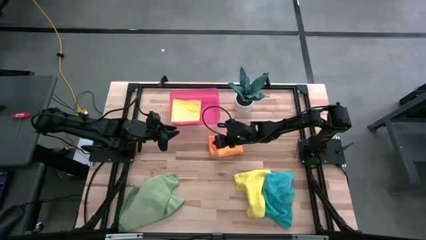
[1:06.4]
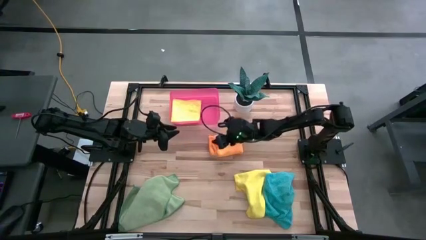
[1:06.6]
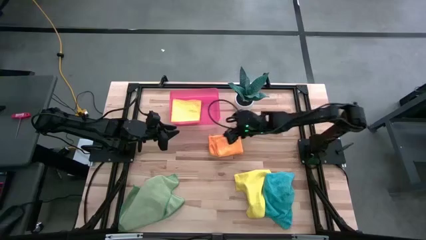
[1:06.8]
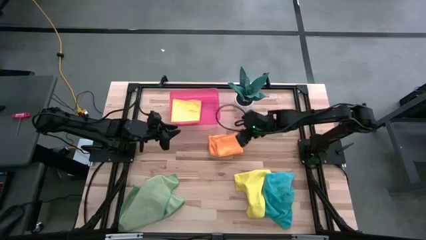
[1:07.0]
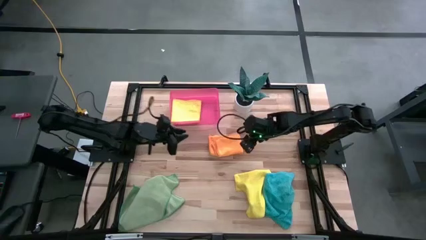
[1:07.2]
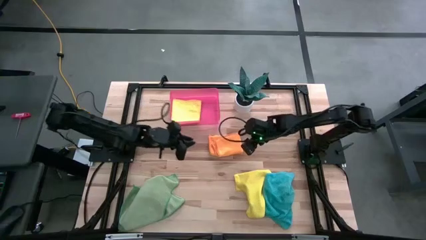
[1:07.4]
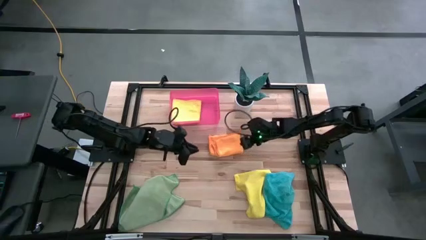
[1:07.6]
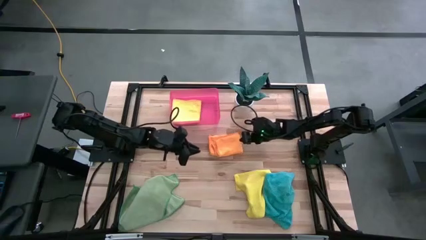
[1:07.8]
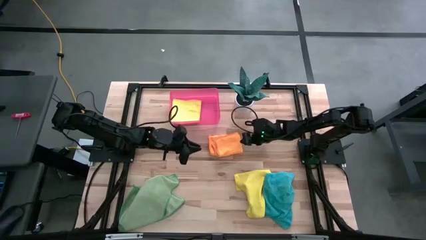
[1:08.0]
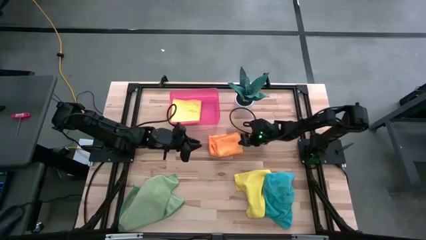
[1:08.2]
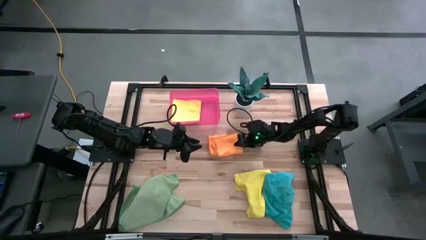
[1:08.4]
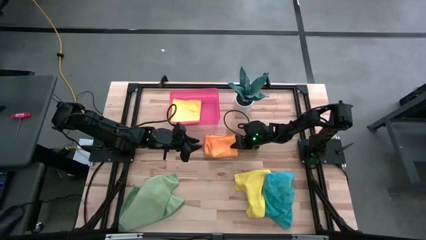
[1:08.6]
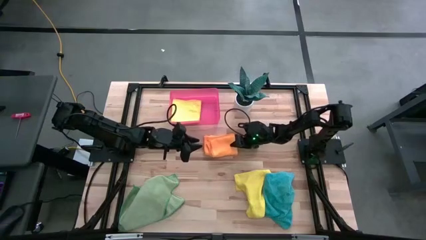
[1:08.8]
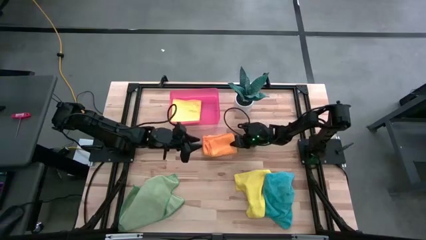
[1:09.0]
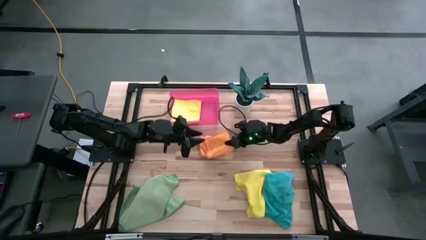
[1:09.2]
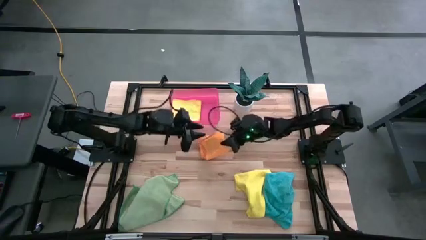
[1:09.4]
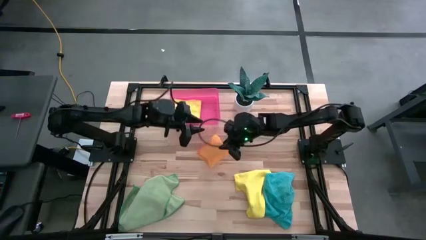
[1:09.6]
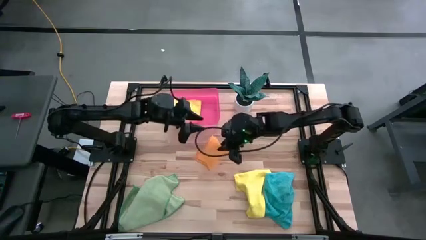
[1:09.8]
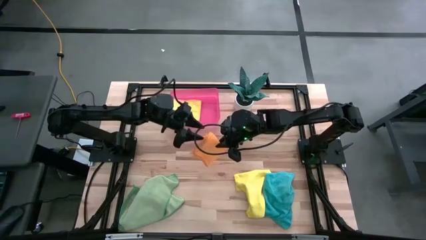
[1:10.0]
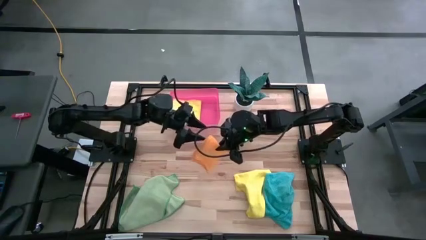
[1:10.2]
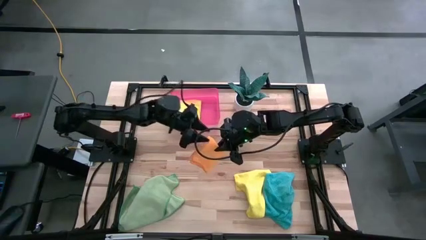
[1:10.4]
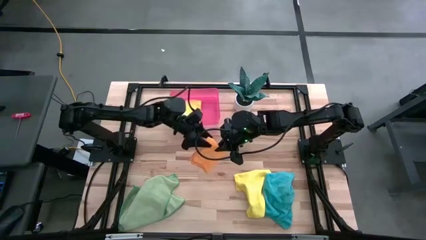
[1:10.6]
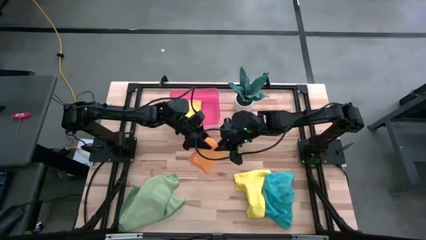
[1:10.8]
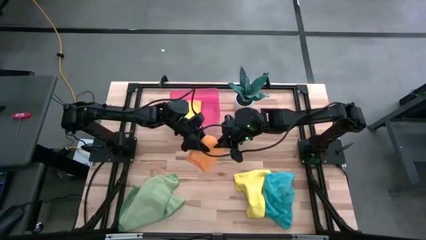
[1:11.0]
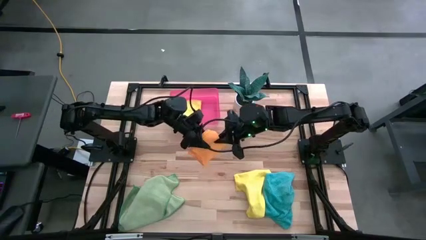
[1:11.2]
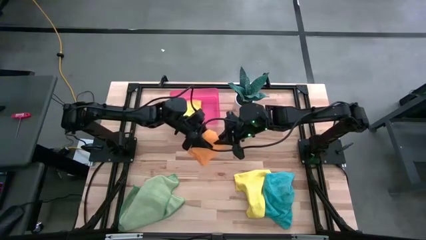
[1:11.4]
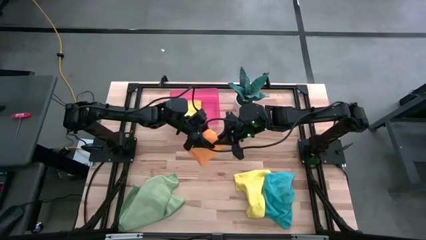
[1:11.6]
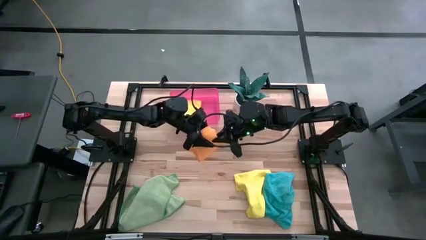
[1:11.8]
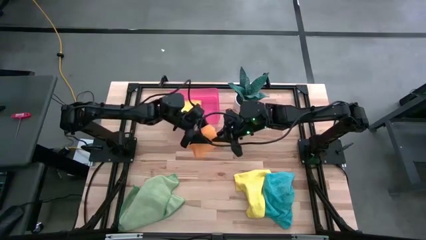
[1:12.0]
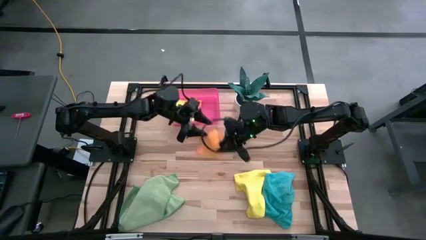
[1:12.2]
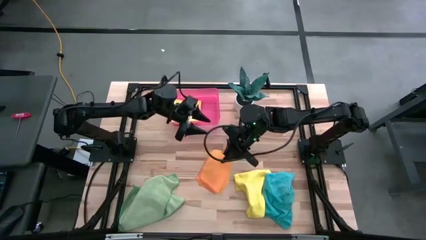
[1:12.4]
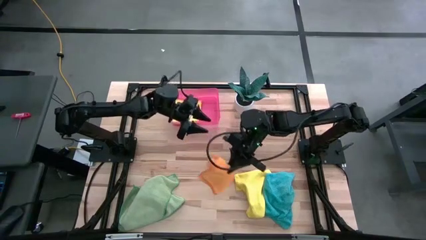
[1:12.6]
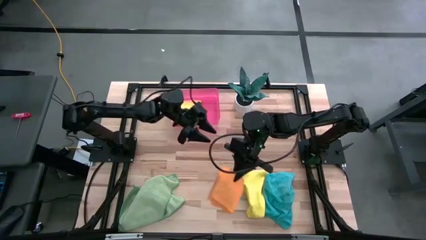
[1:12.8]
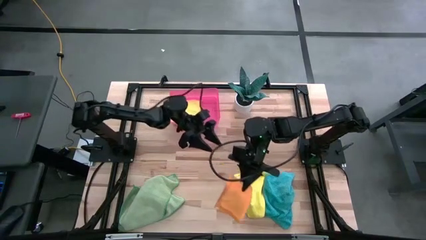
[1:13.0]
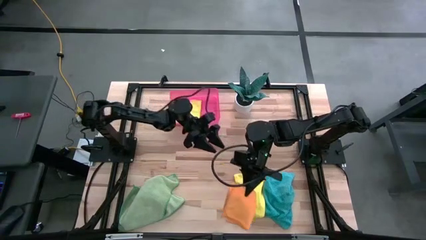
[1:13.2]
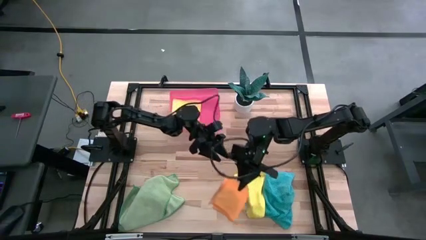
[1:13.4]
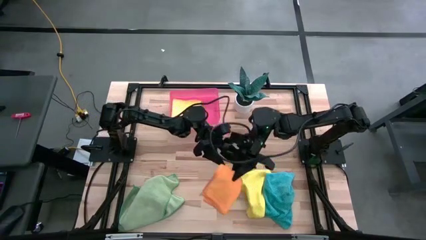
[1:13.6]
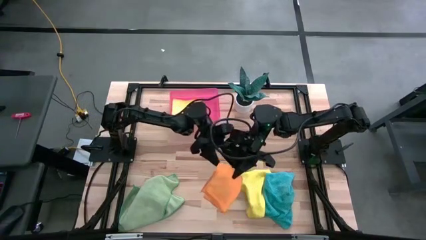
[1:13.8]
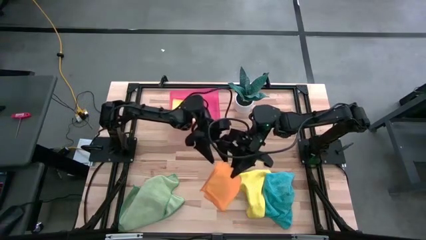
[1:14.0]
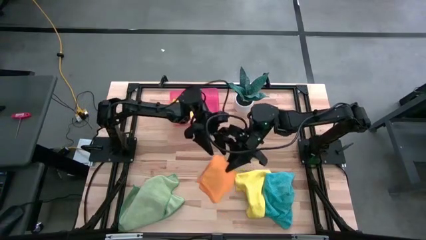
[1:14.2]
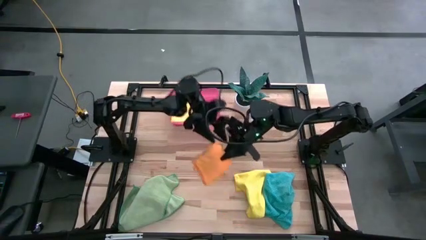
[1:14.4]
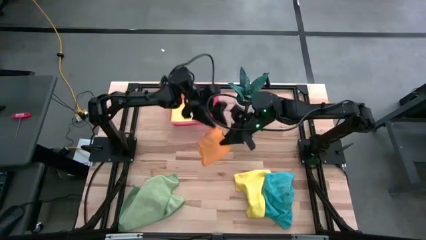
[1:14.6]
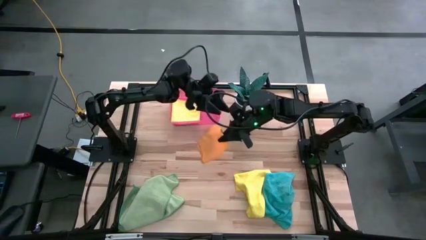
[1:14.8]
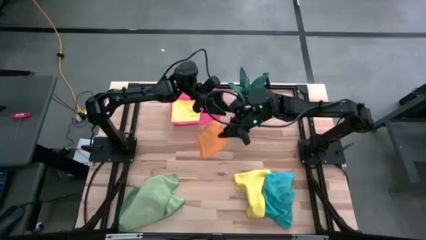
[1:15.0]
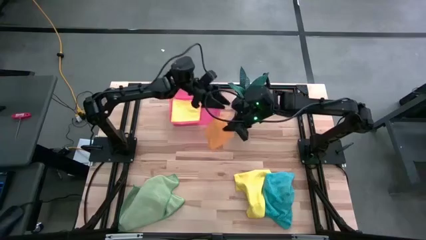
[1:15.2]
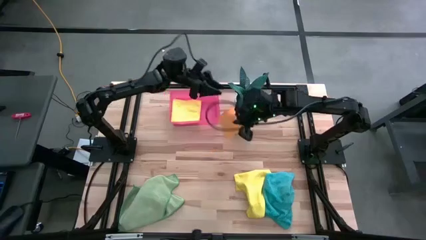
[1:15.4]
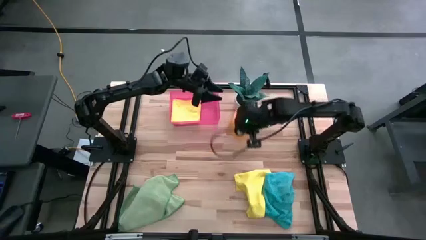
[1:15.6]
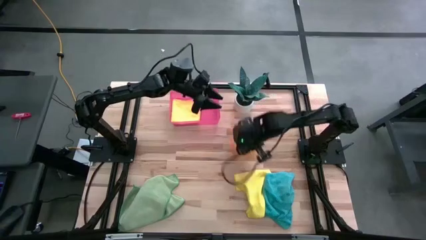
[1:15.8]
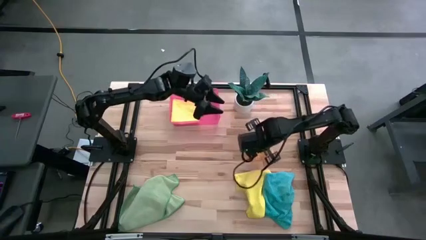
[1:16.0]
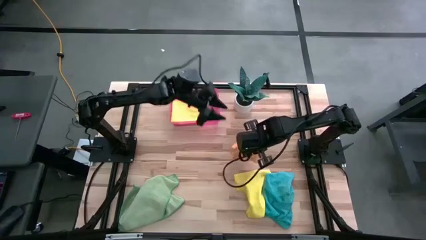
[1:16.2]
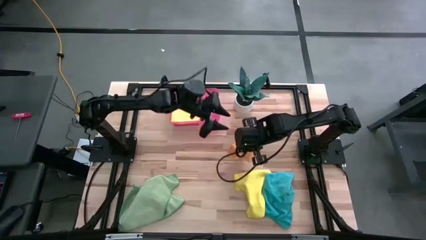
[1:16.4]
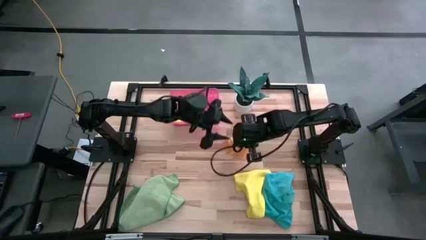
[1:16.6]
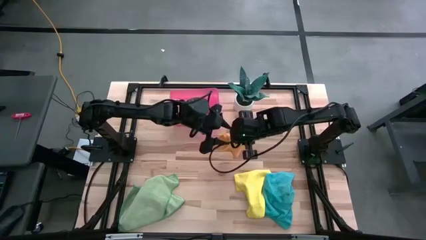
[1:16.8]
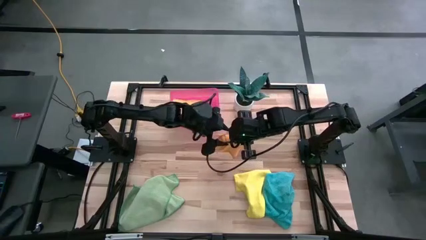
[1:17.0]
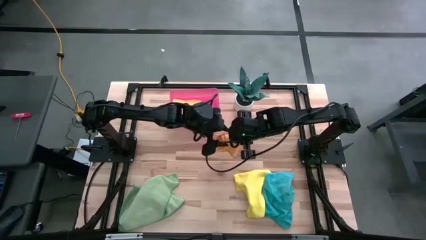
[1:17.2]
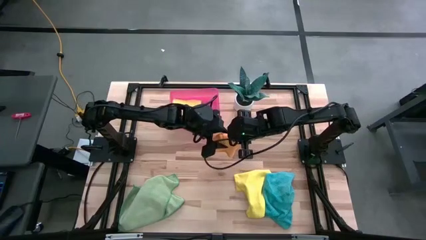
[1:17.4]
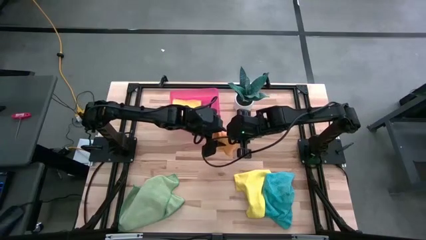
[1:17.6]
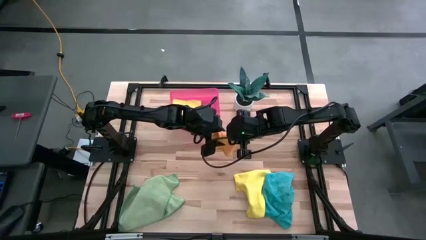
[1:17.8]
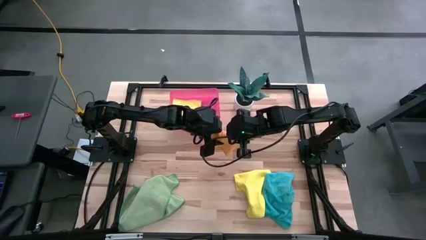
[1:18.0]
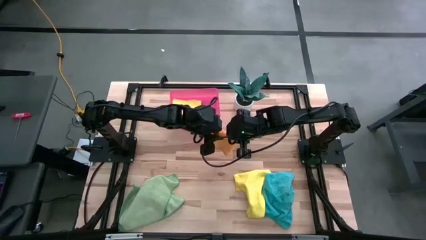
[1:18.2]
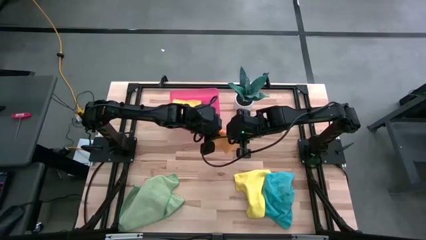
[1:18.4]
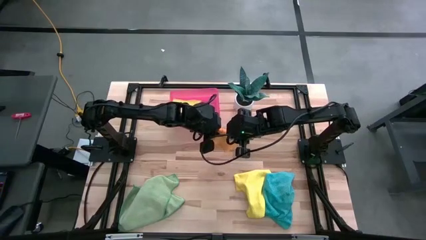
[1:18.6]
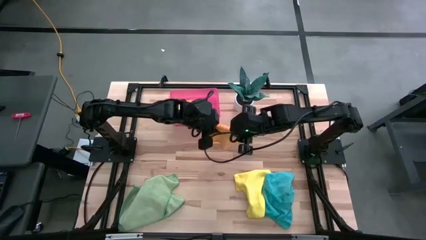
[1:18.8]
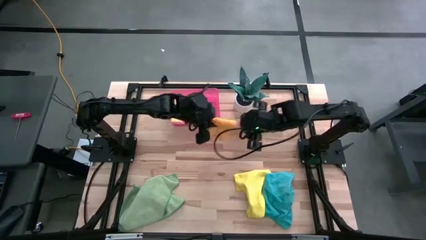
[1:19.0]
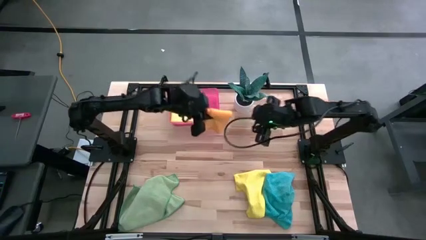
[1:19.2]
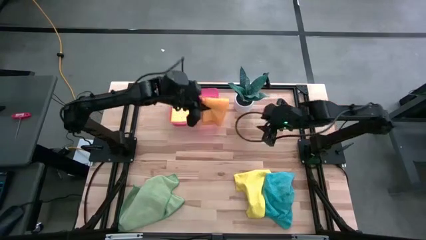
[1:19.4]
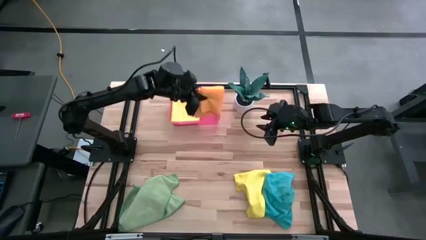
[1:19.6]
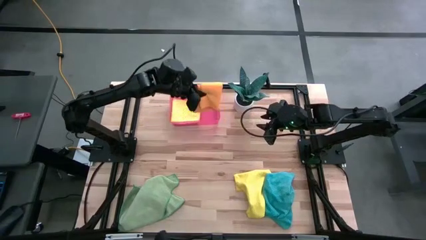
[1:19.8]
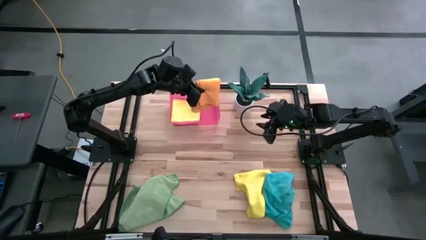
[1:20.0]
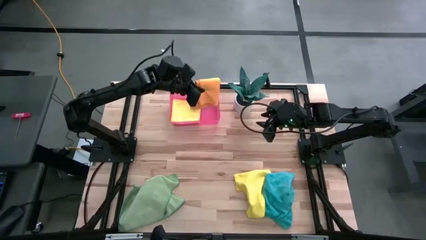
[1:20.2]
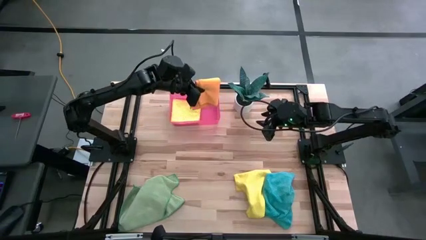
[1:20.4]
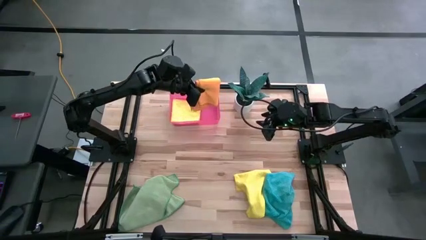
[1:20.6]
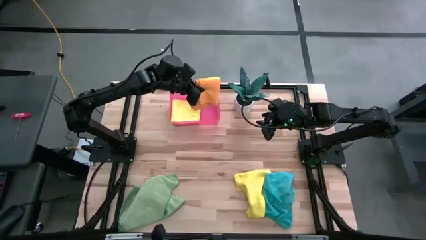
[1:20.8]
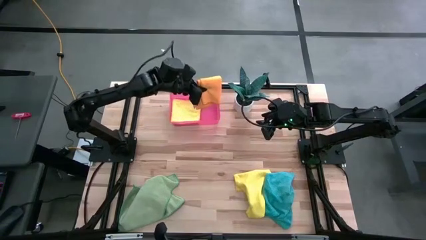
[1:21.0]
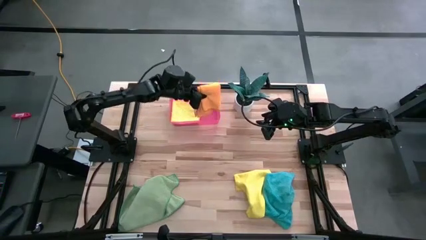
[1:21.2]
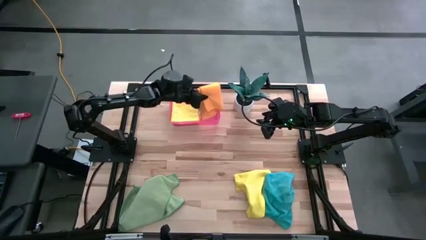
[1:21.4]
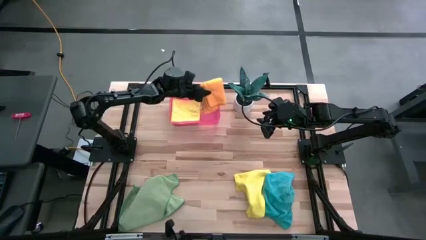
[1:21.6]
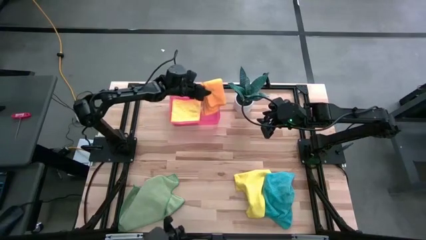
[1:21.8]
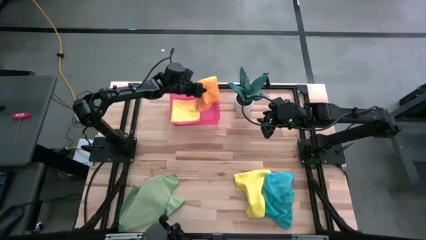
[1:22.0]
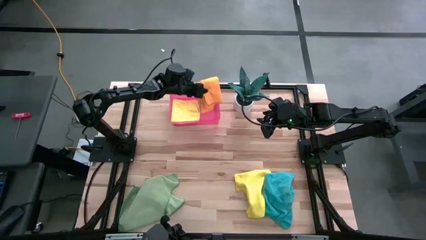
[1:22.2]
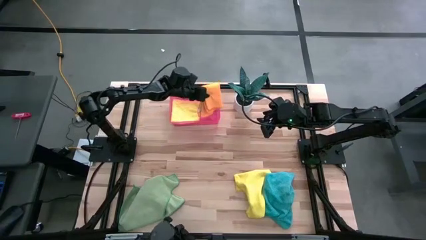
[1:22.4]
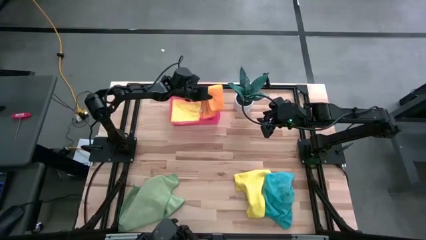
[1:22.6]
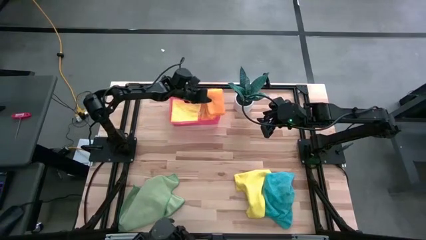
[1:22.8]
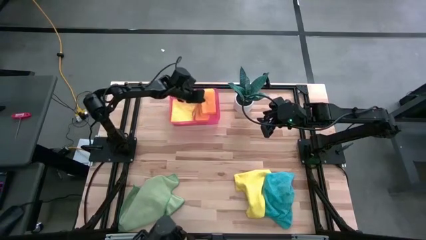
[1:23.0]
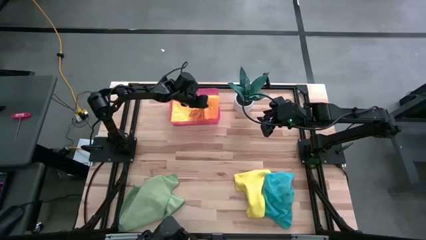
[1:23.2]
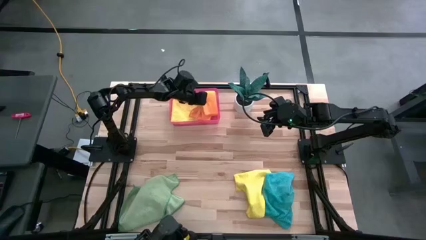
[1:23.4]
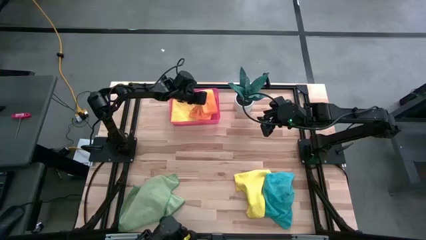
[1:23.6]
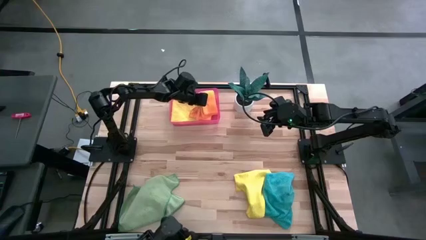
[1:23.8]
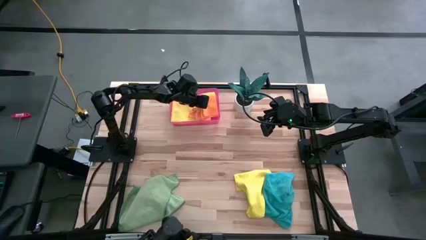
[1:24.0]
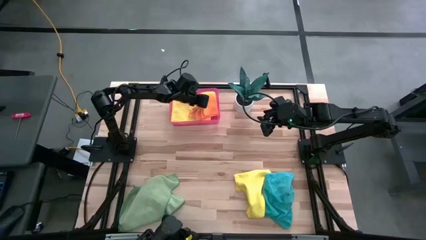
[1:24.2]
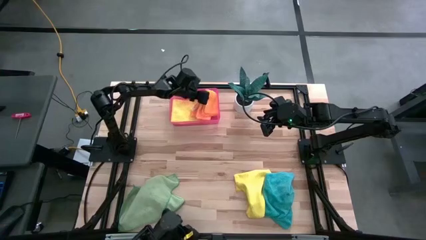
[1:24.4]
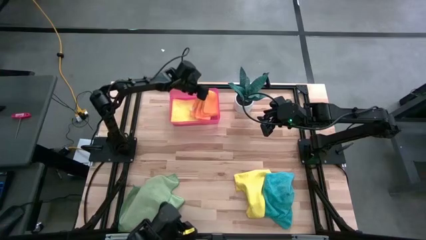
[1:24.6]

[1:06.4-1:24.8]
Task: Fold microfiber towels
Put the orange microfiber towel into the bin
